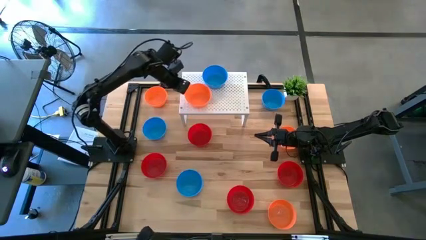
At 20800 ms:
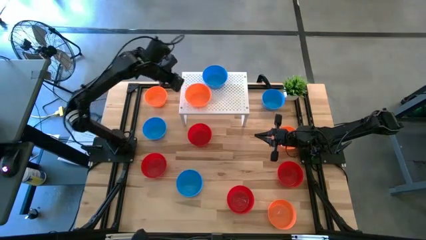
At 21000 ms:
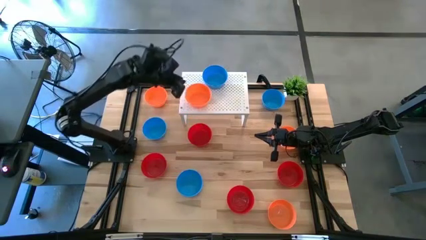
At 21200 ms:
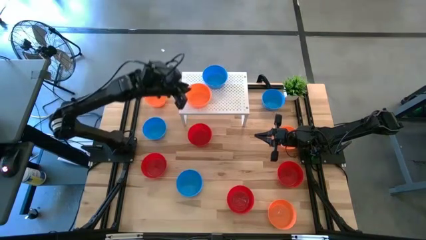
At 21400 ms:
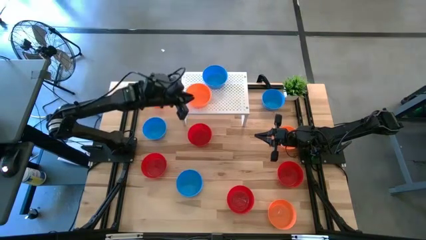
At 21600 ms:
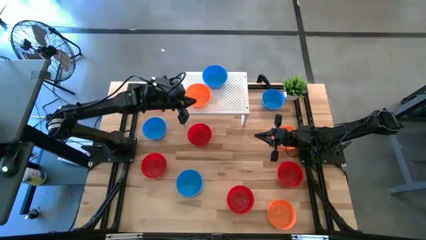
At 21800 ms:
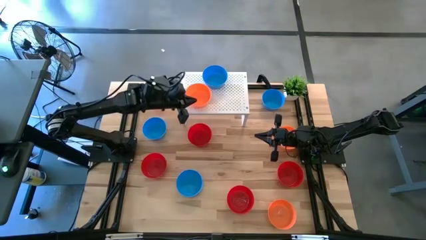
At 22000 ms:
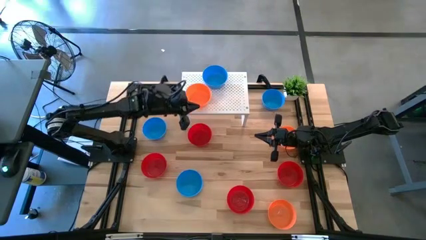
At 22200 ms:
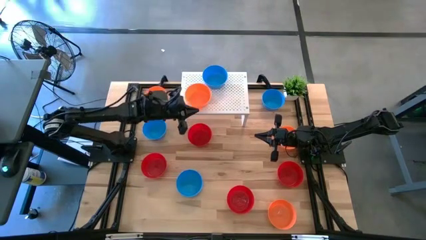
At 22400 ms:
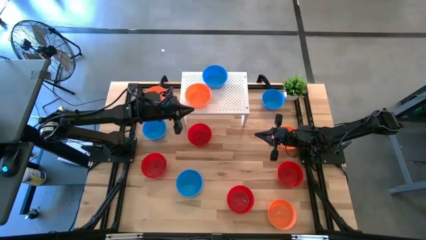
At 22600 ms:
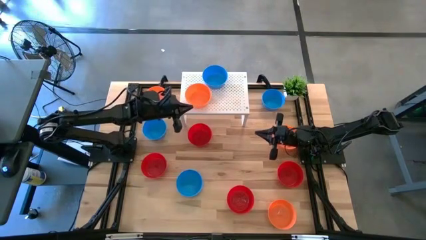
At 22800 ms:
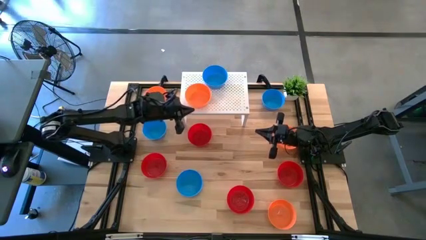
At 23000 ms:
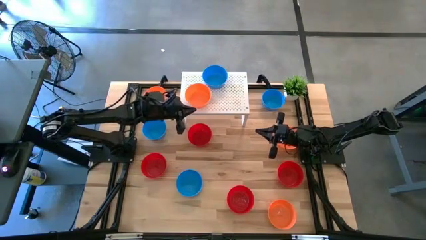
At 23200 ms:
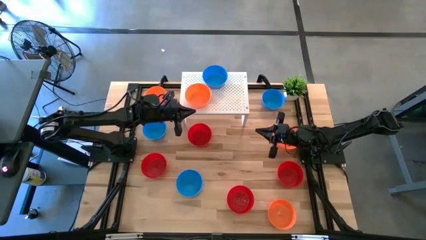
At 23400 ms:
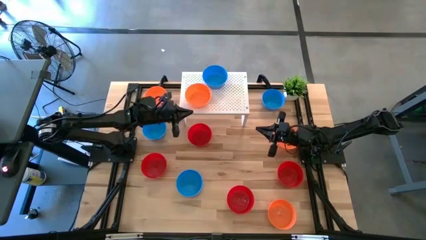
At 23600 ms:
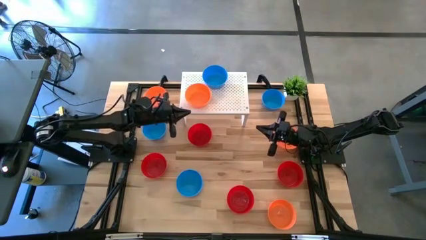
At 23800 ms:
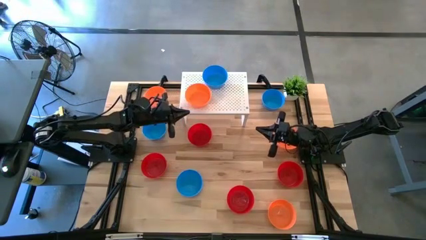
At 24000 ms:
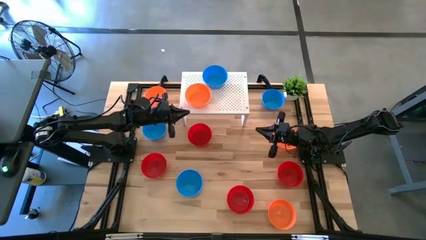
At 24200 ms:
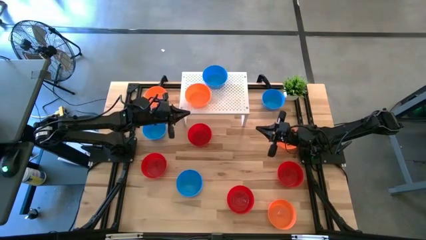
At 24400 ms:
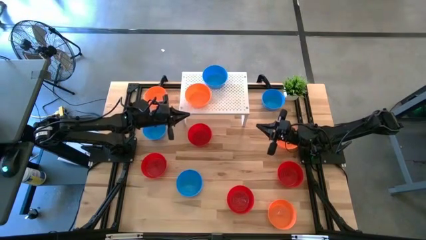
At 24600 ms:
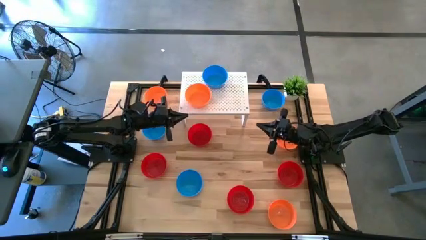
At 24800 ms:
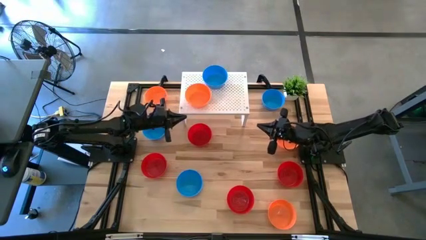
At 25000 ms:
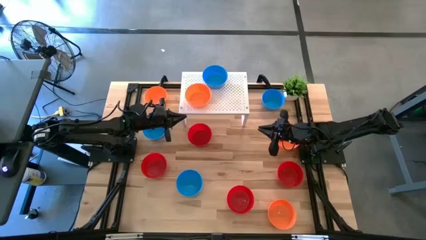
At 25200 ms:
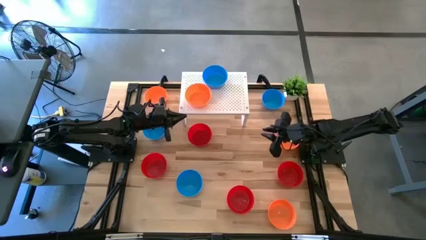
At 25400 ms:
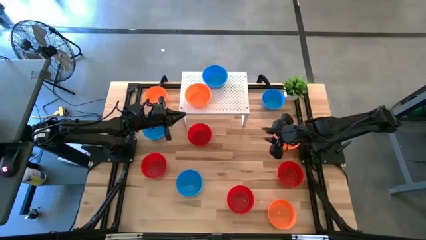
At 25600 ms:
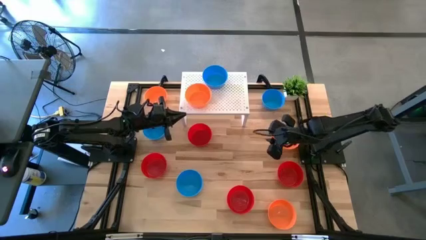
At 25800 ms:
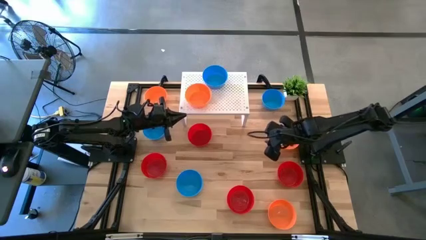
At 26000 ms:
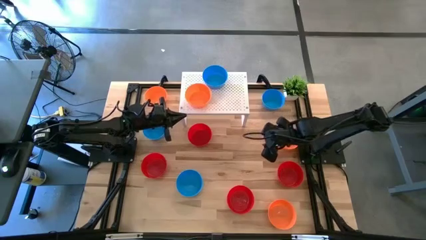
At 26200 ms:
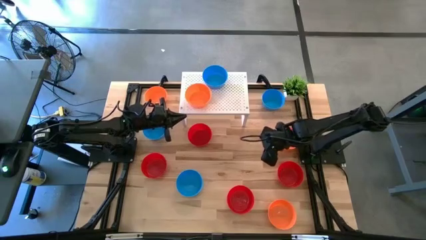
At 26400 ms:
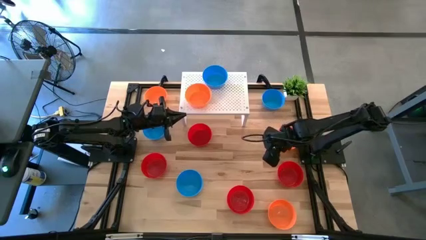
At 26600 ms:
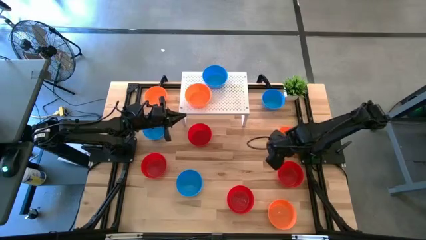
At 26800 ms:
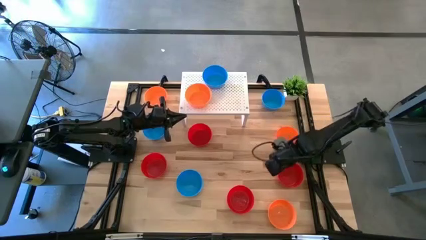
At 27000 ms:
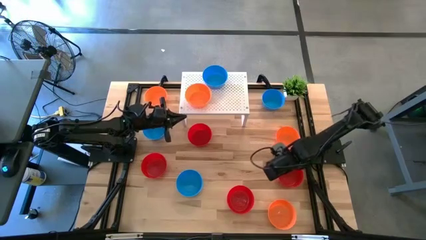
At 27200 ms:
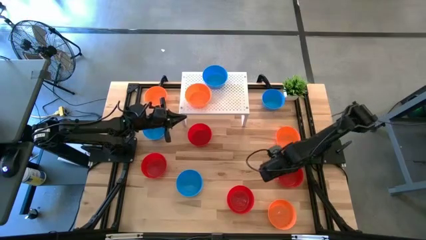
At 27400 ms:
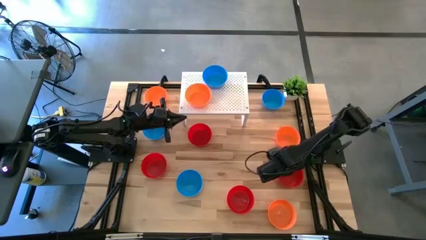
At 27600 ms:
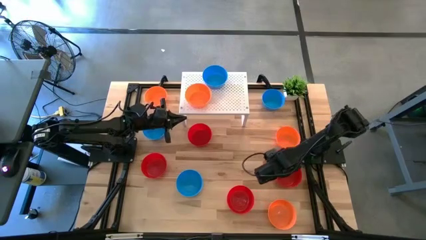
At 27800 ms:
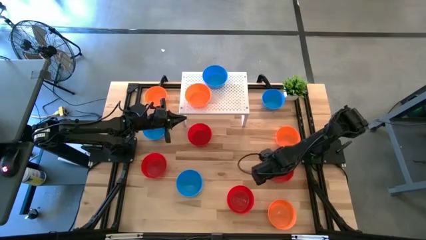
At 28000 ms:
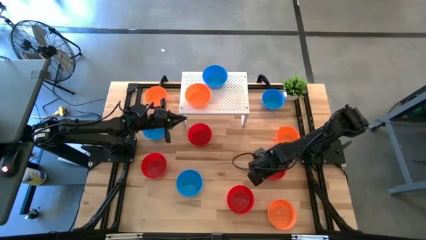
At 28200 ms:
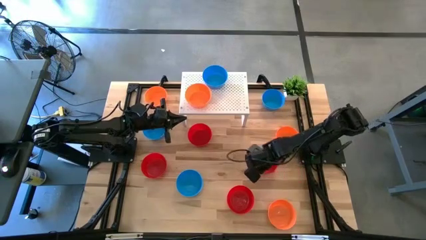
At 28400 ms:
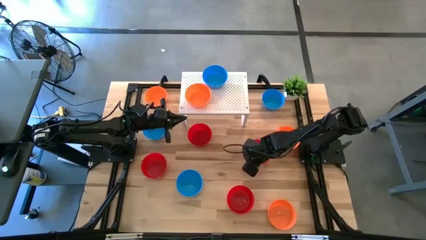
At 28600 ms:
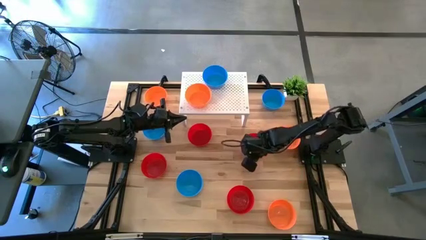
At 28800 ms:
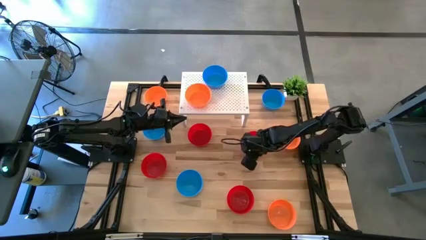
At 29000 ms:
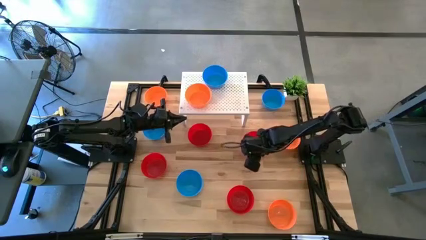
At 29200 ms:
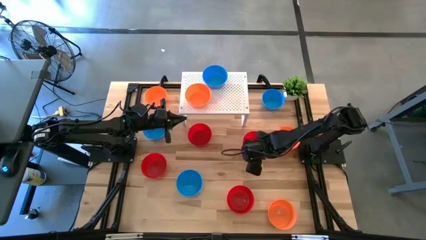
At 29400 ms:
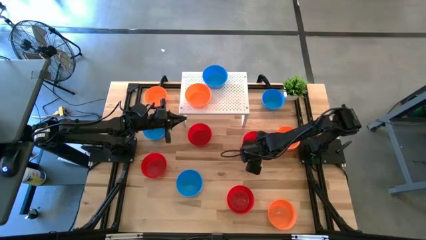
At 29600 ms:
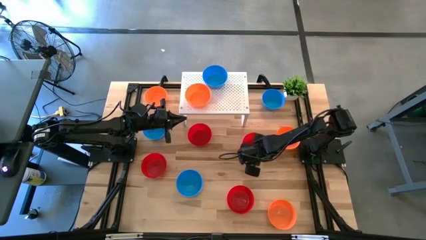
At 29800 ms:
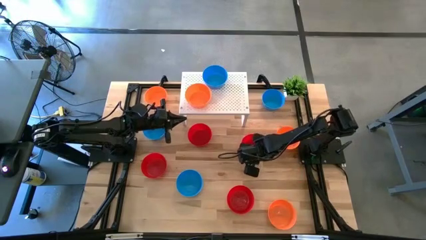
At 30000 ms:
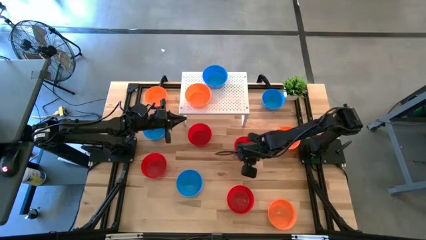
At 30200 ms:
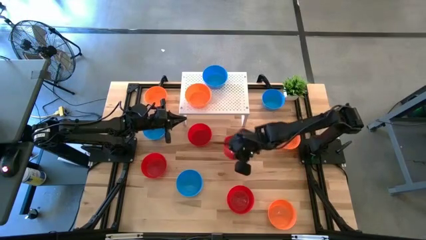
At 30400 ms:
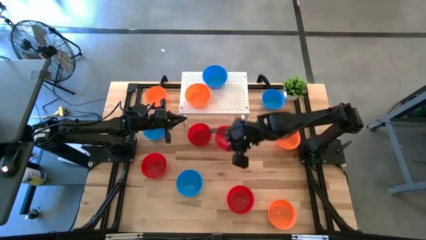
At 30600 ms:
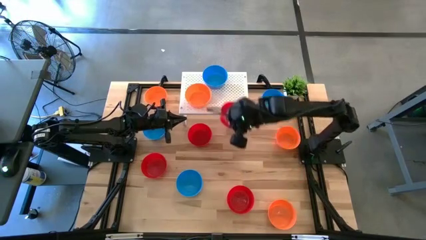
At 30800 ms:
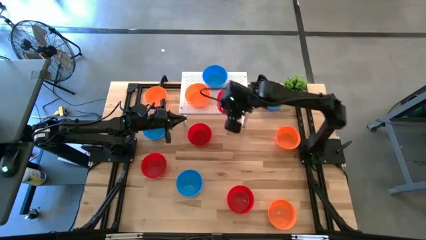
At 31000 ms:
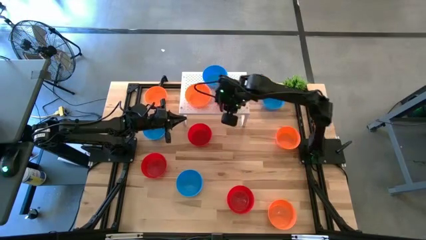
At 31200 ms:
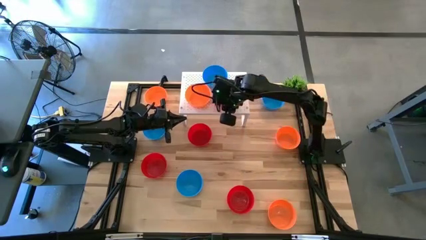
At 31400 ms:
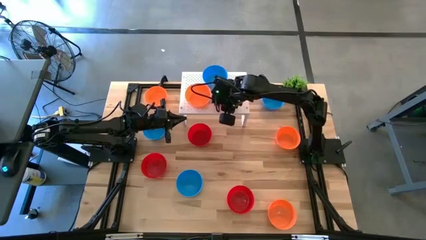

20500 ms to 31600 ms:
Task: Pick & Place Mini bowls
Put the red bowl on the shelf

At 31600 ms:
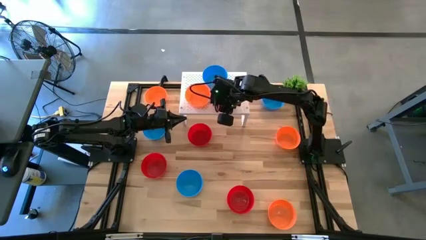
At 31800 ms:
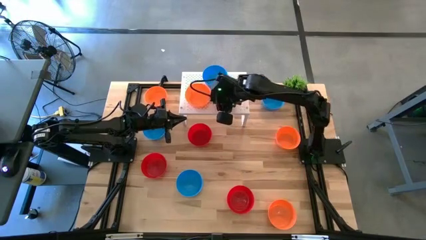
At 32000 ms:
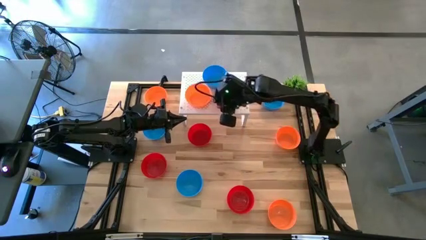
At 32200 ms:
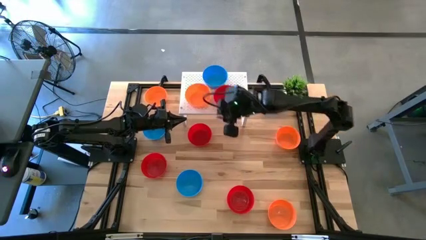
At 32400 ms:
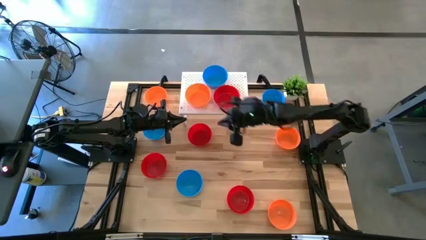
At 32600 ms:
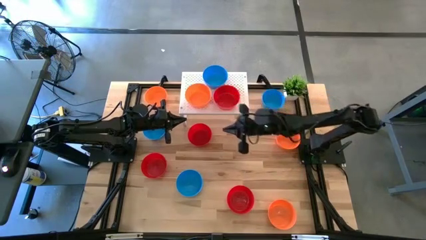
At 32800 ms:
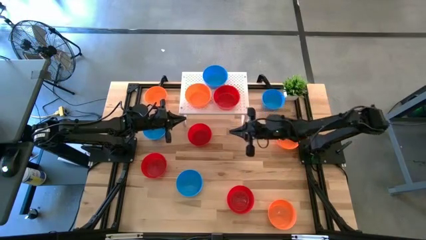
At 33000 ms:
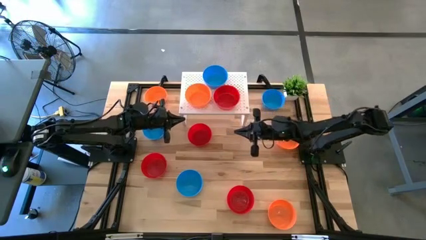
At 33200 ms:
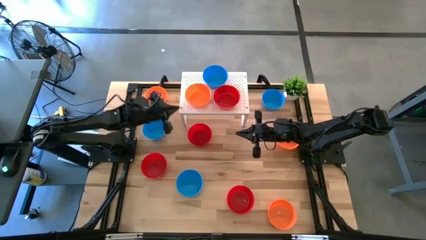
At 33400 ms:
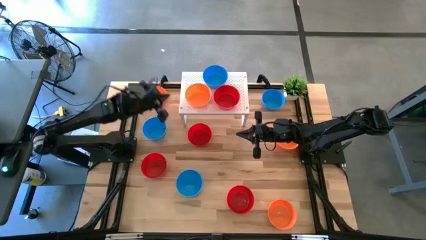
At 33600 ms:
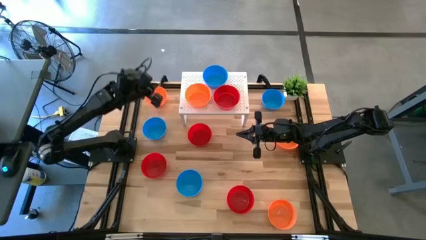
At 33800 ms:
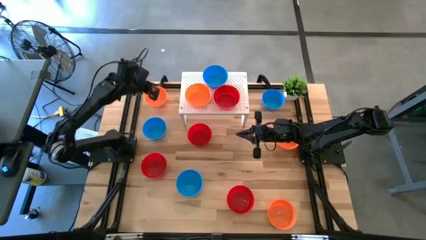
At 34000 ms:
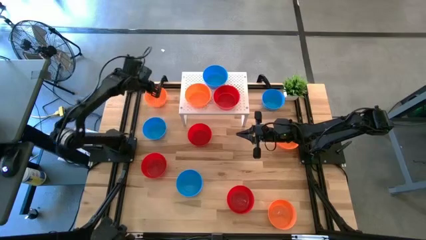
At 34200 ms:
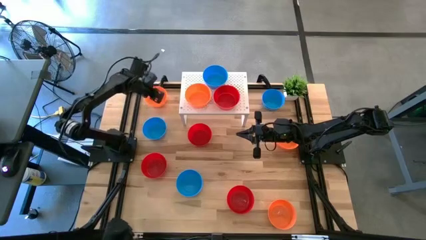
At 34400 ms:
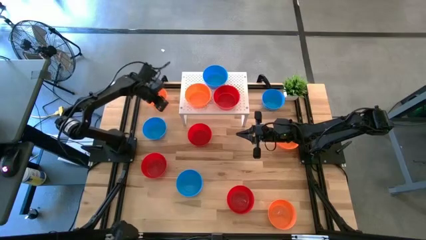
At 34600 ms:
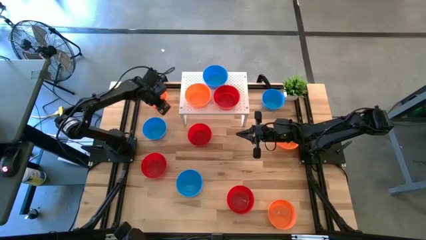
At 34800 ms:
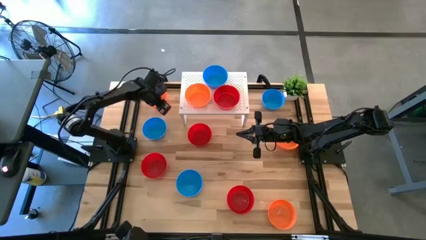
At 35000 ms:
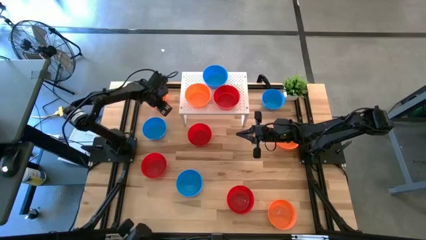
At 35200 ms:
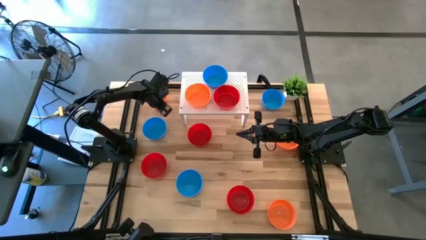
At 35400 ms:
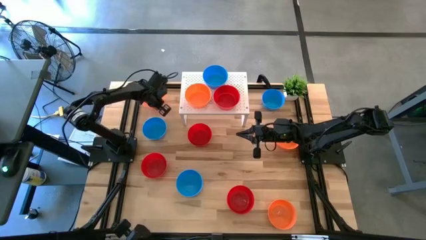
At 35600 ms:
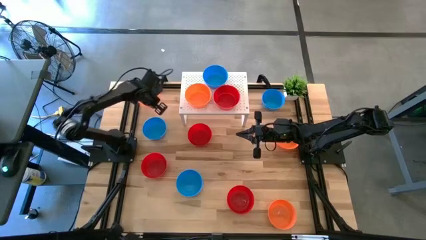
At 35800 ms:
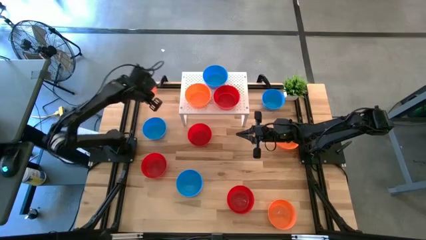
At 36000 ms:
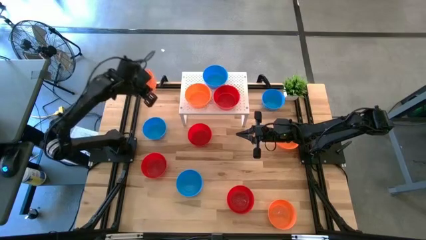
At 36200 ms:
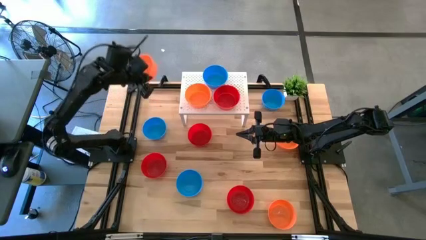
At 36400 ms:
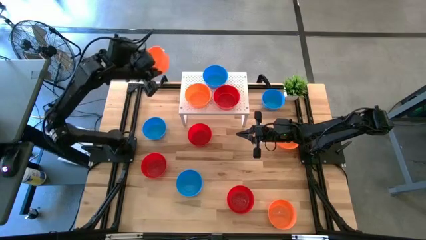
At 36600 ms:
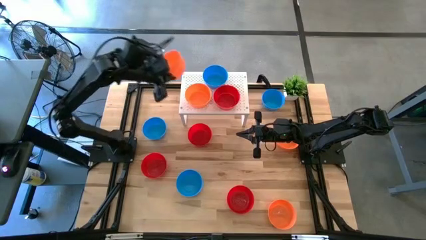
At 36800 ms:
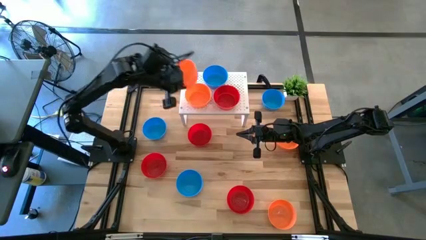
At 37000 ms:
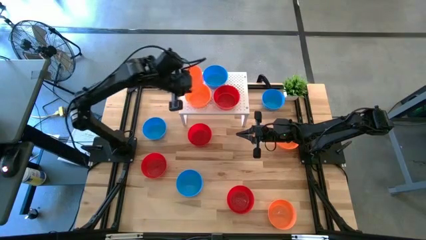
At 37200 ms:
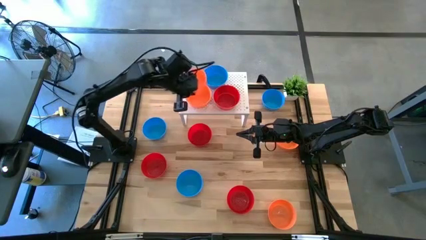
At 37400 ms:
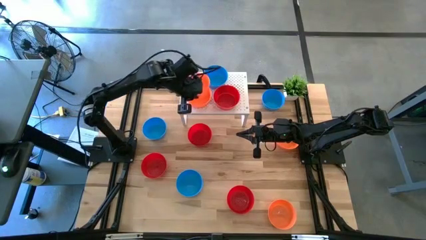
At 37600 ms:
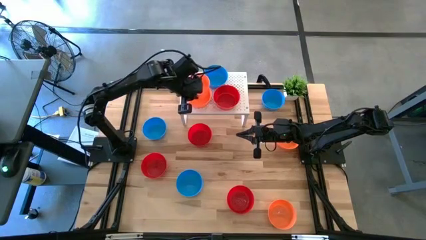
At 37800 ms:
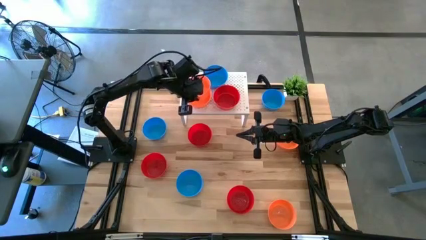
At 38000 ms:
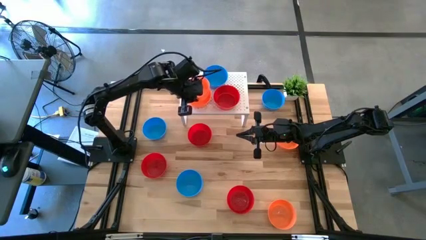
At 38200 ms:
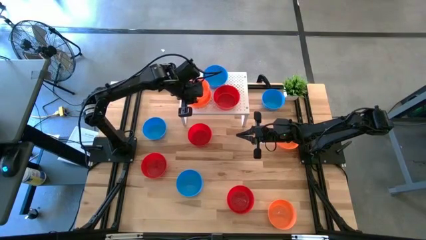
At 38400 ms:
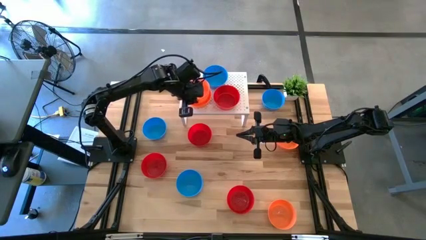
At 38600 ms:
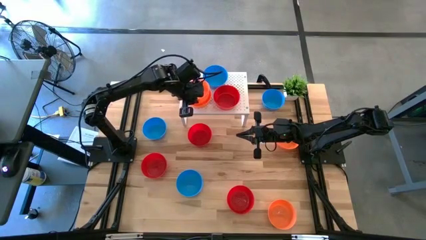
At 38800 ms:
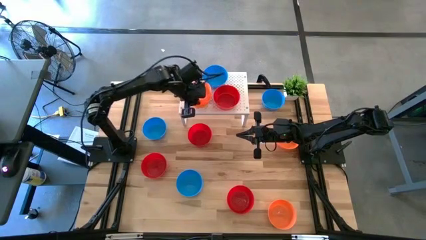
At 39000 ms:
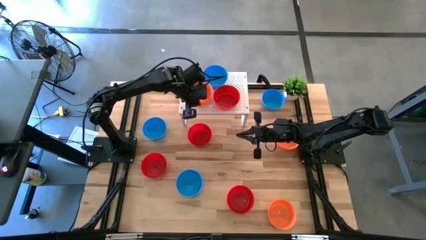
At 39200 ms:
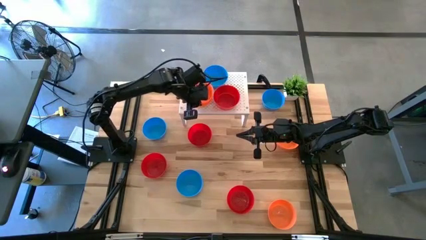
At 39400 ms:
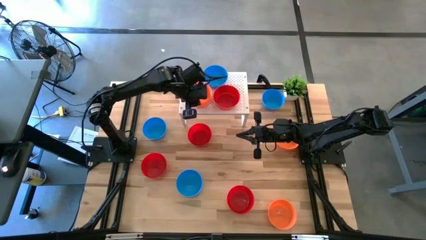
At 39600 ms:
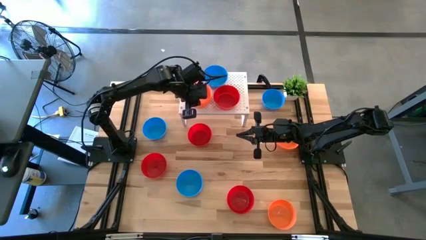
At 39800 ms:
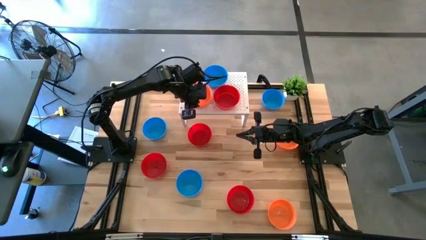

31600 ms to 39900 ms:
Stack the orange bowl on the orange bowl on the shelf
